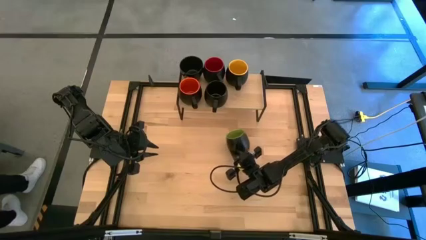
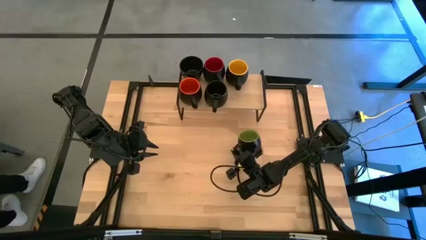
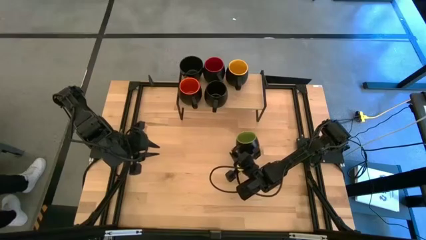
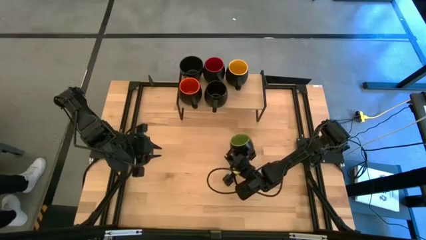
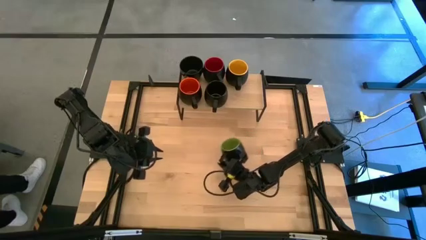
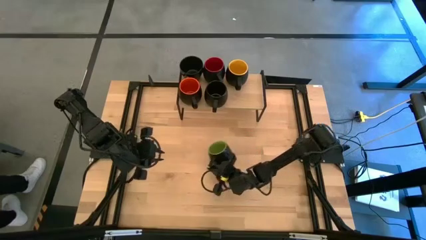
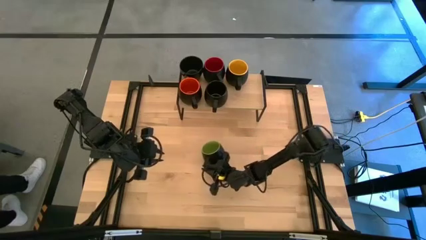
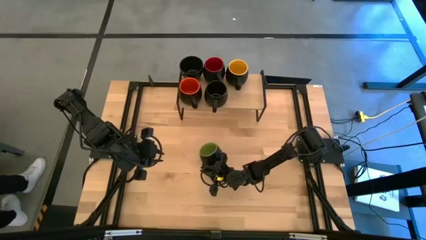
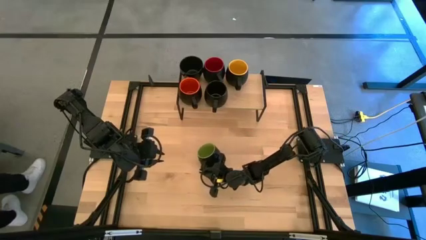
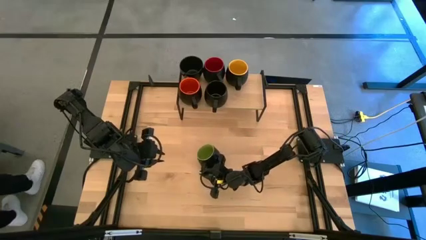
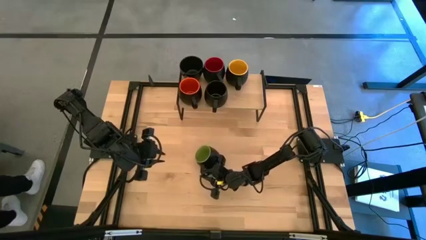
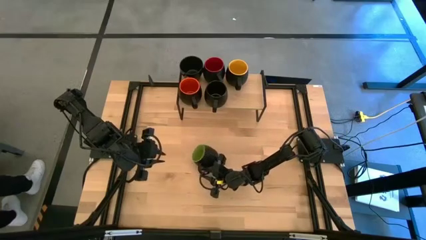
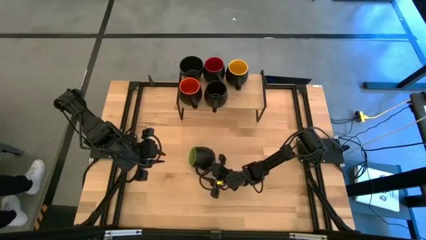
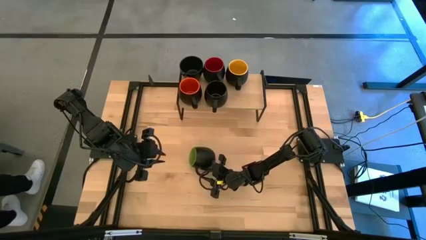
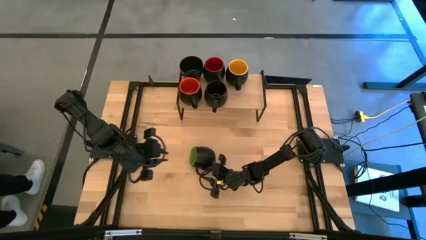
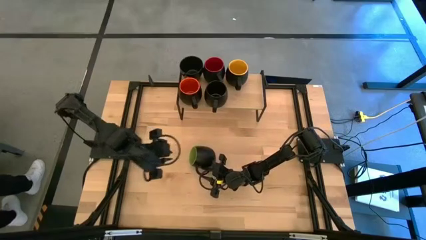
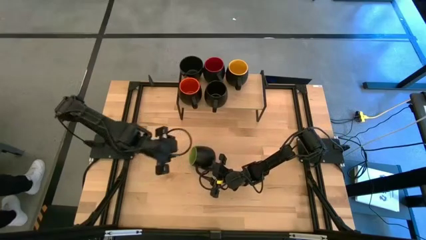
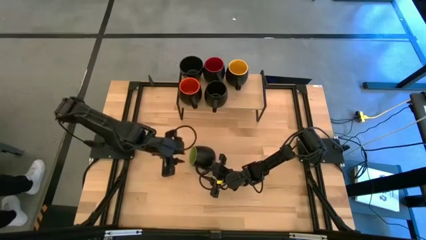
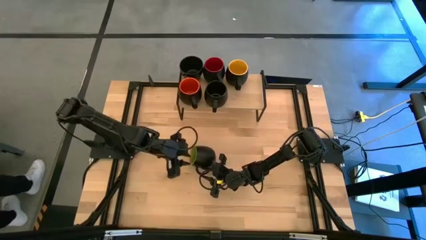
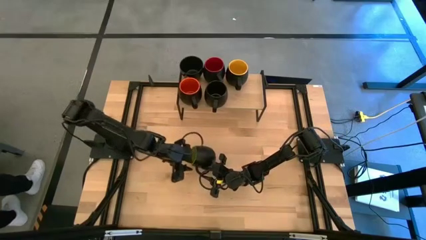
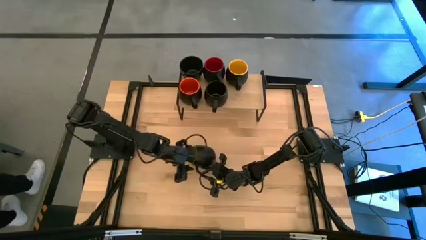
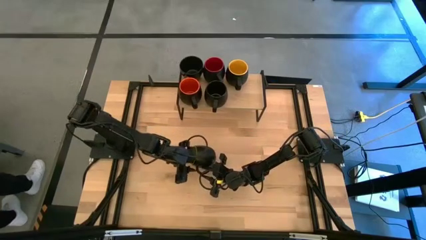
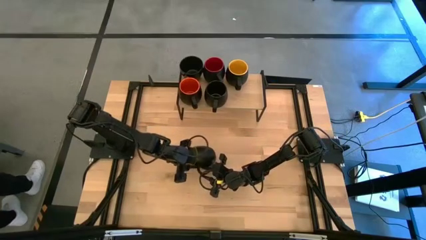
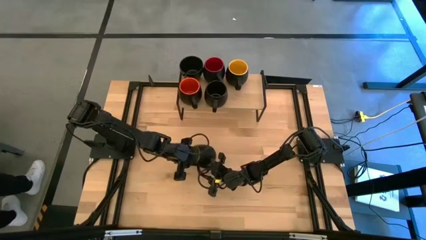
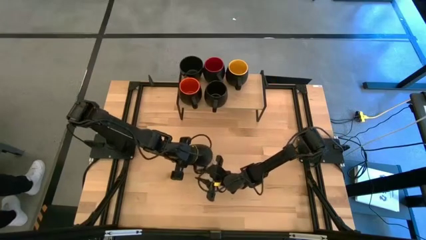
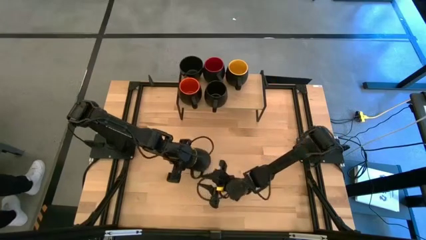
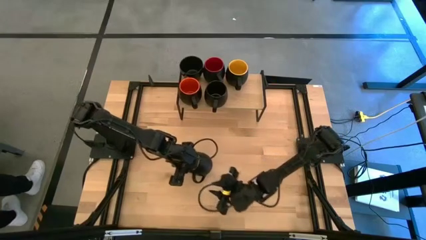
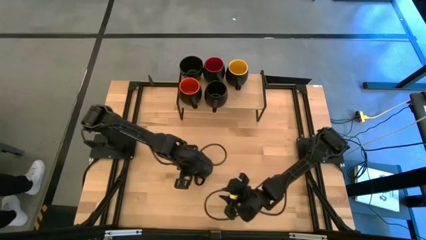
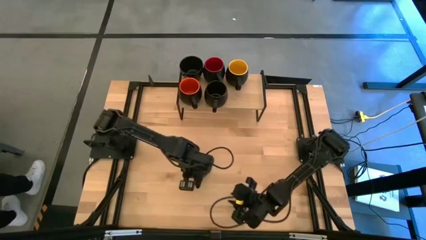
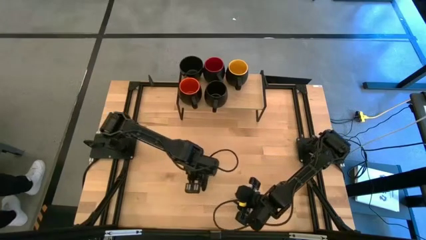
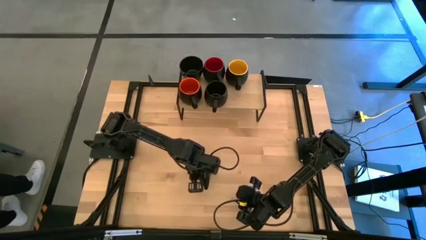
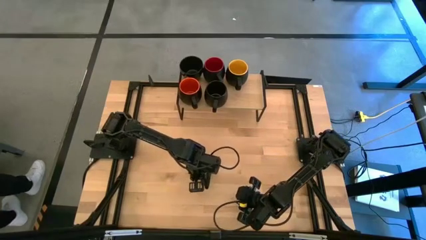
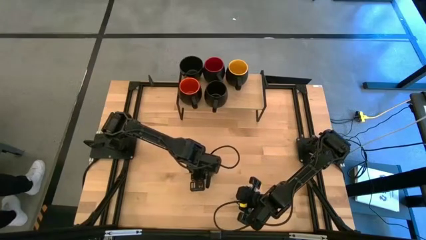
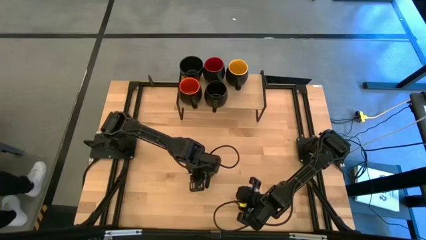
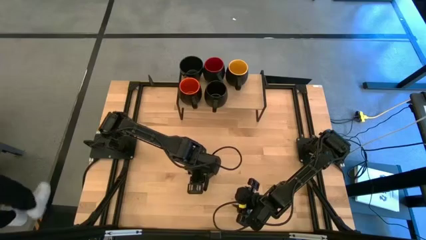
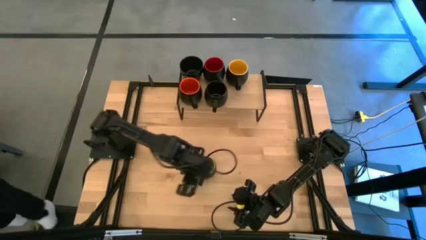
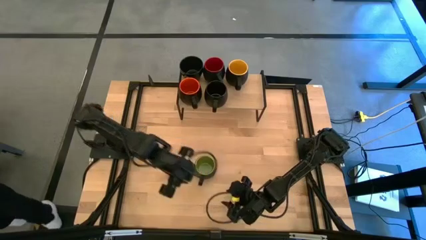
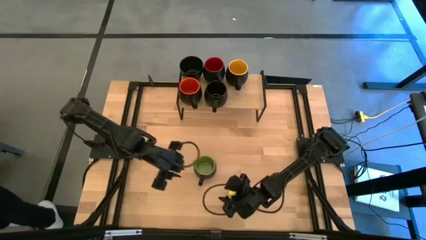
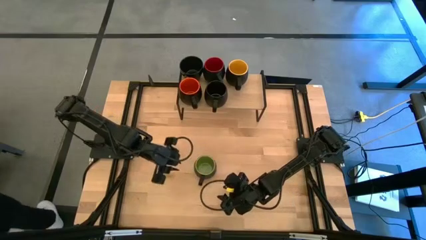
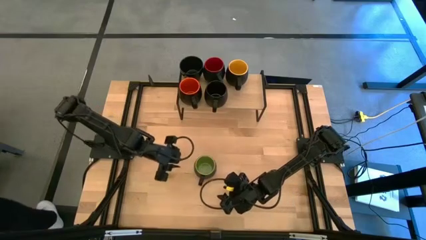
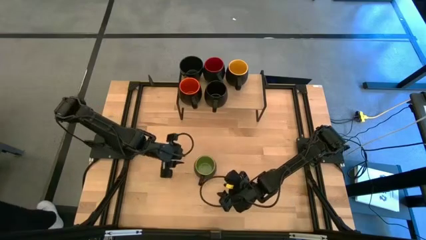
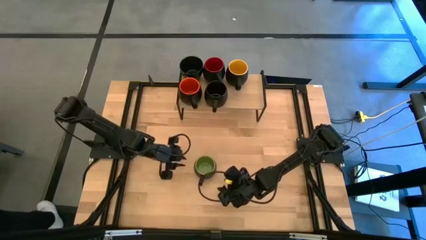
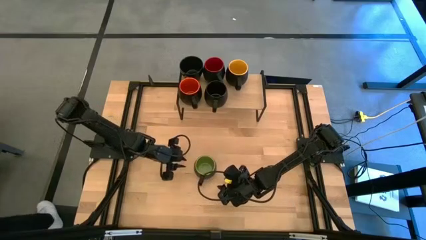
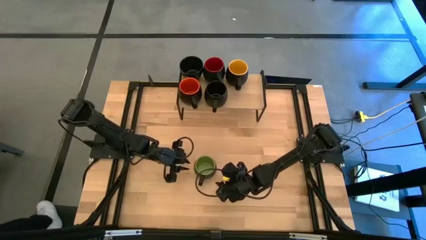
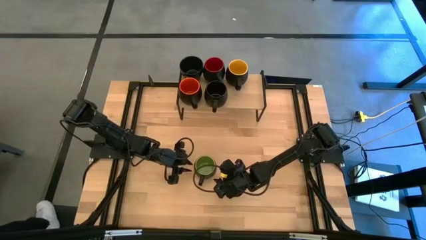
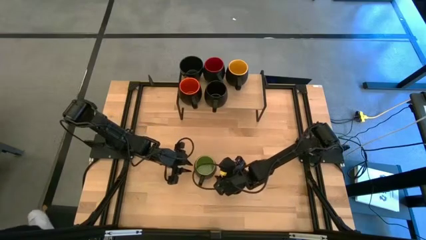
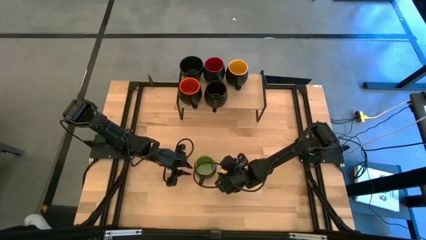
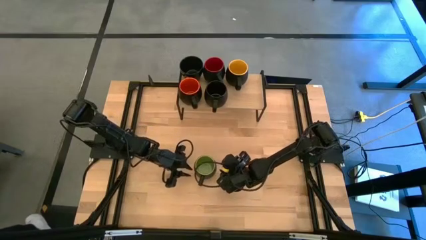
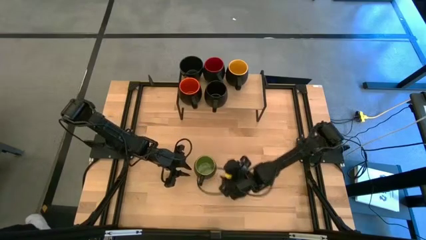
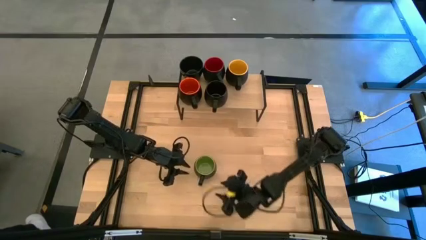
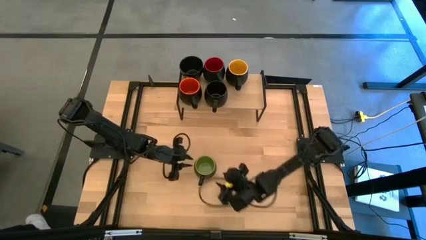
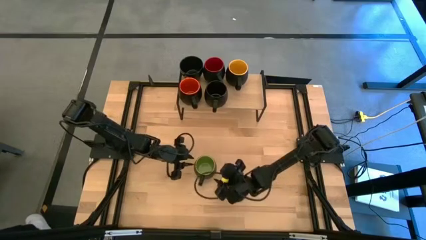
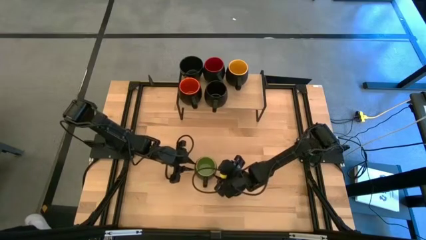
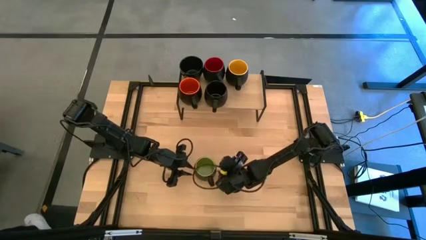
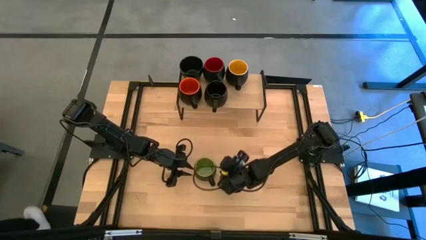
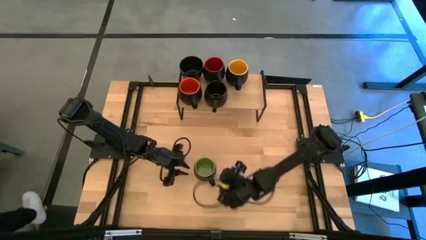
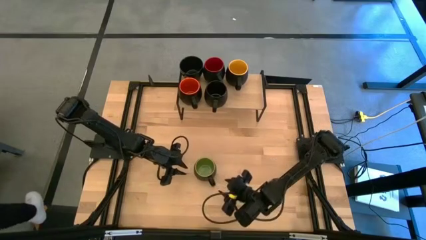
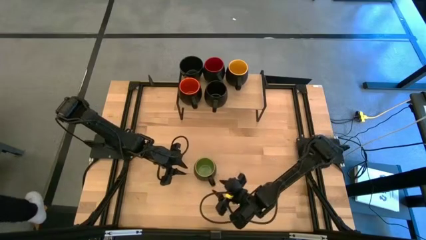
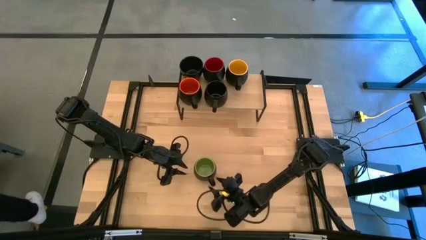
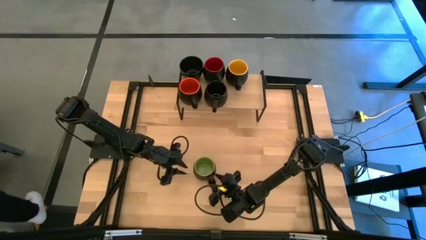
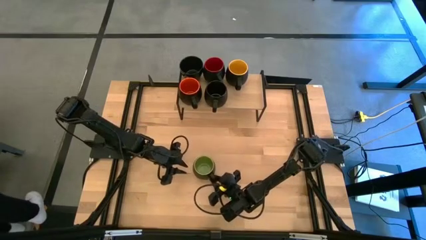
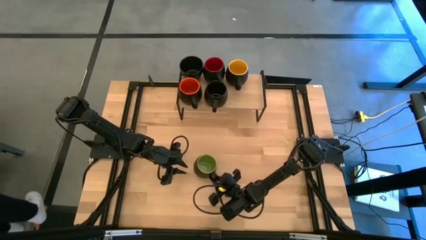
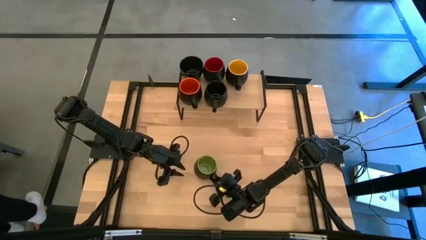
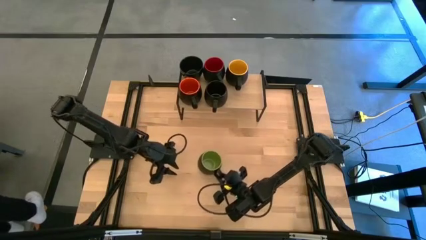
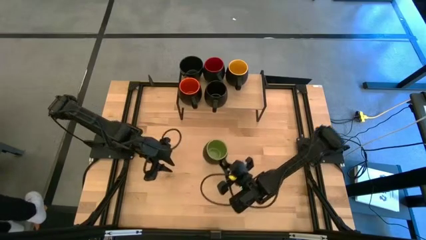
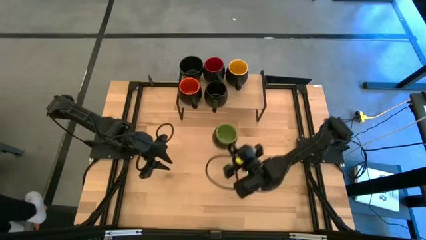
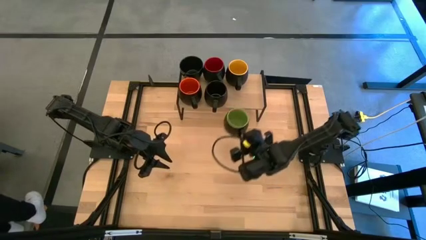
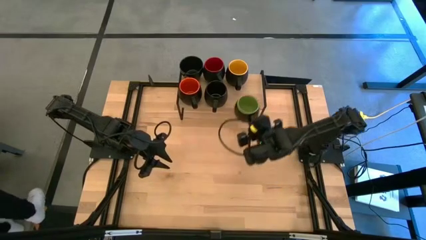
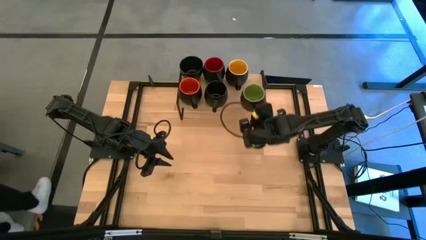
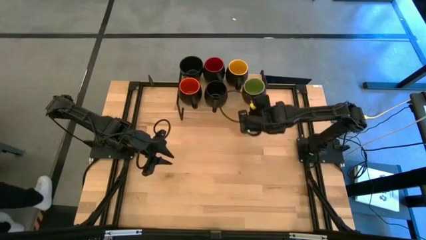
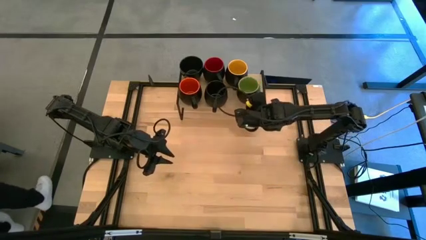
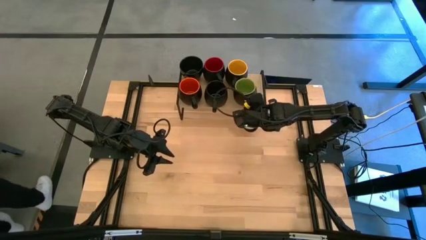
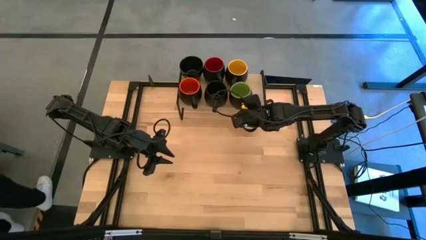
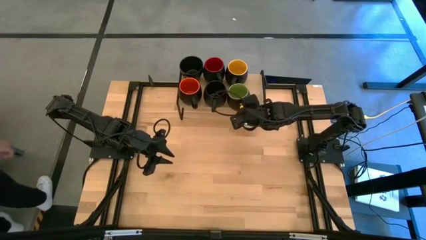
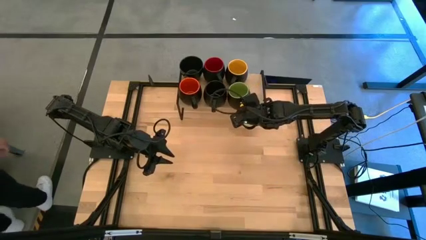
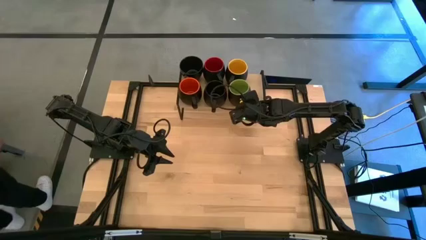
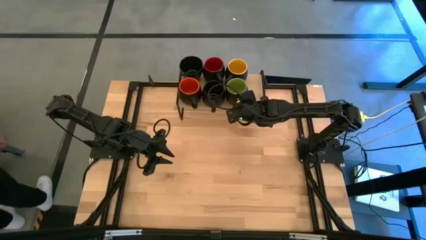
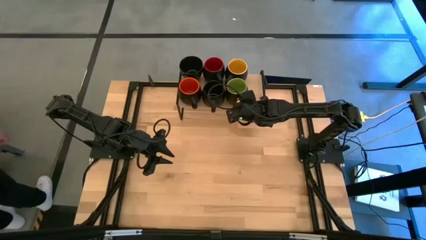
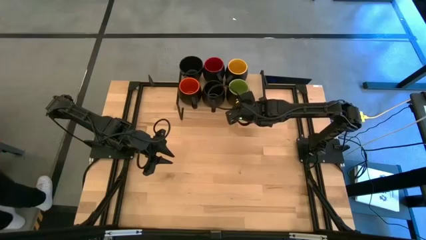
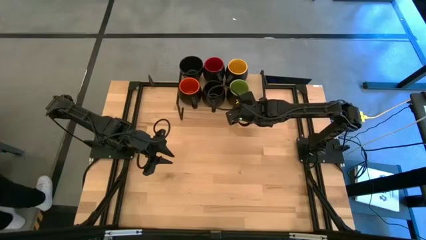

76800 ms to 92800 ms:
Task: Place coffee mugs
Put the green mug on the shelf

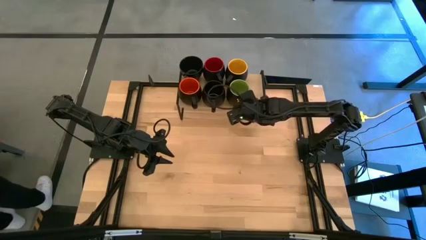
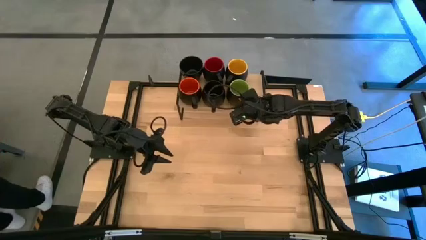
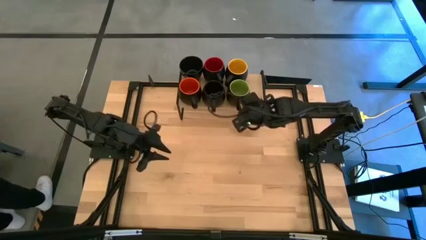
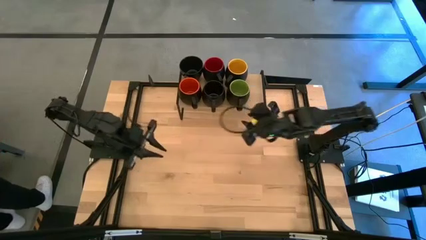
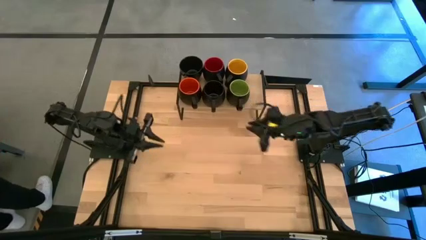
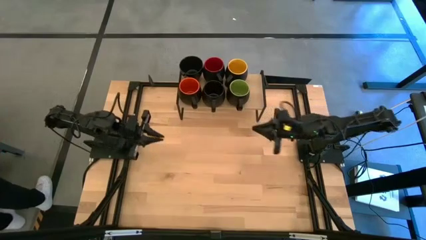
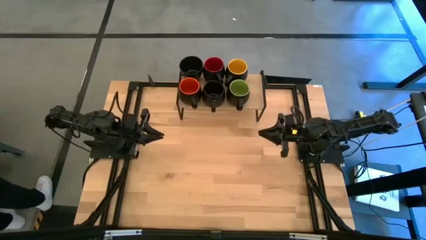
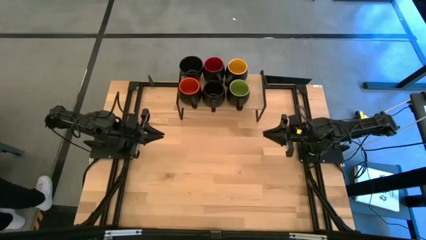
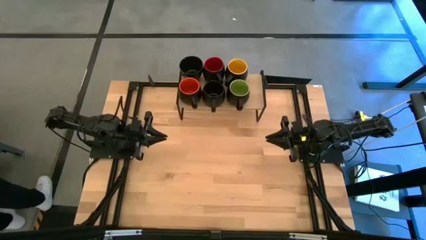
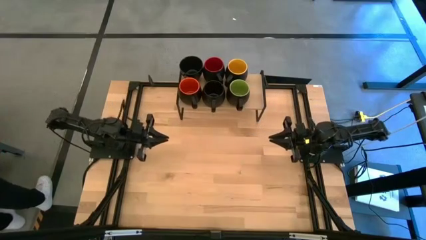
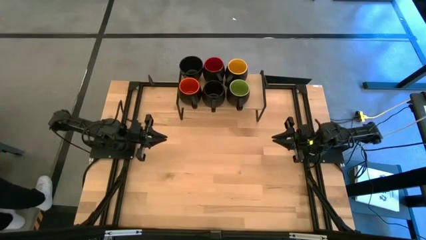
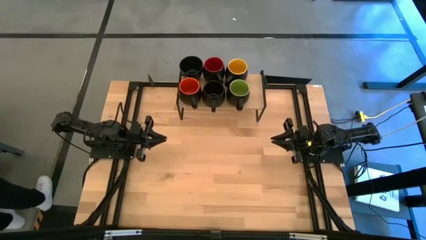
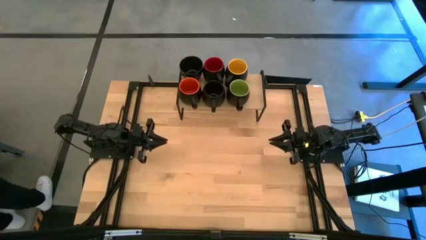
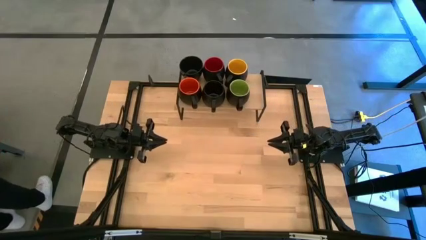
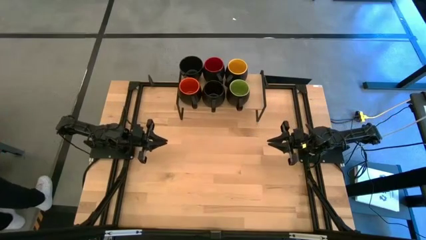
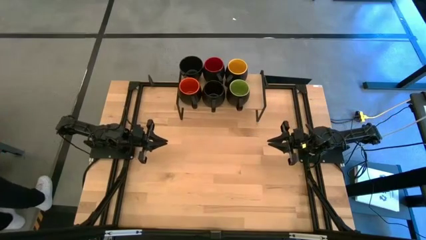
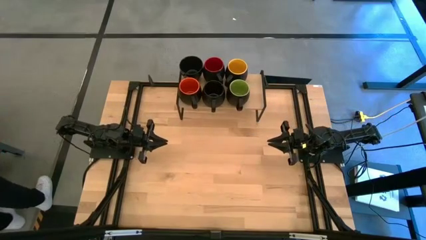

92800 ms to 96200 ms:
Return to Home Position
